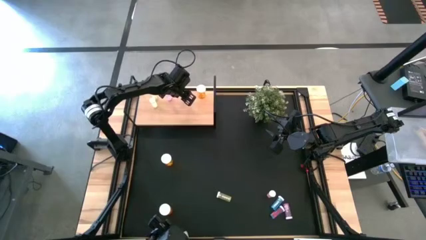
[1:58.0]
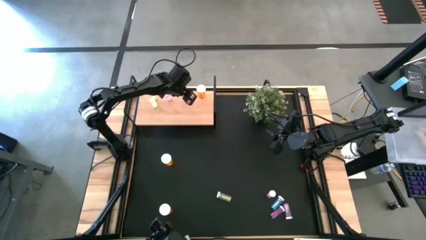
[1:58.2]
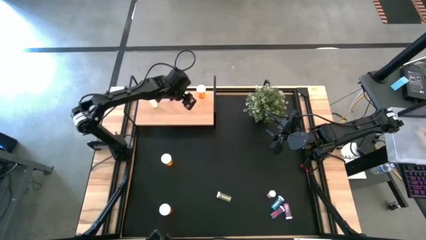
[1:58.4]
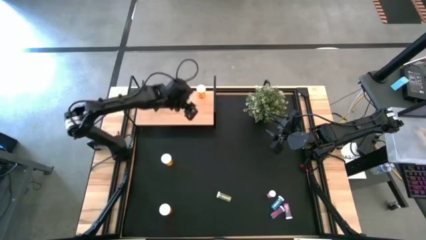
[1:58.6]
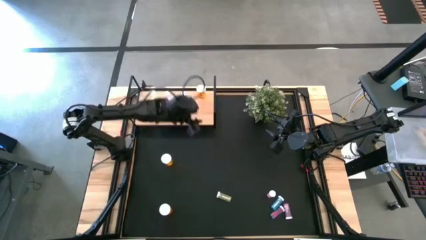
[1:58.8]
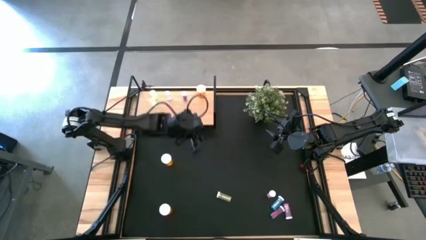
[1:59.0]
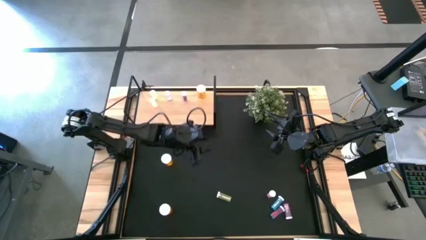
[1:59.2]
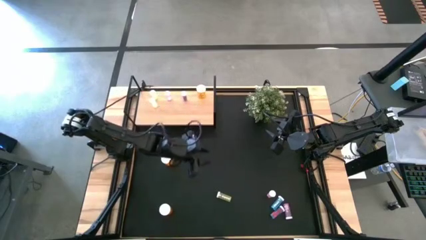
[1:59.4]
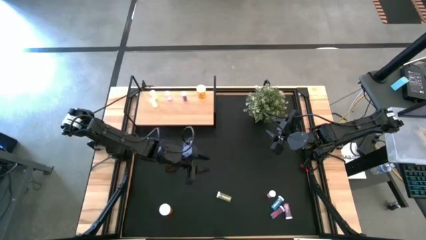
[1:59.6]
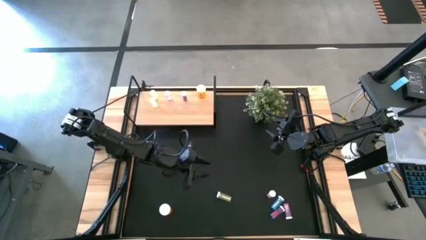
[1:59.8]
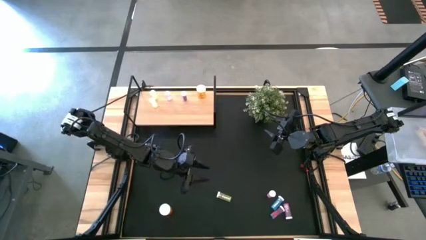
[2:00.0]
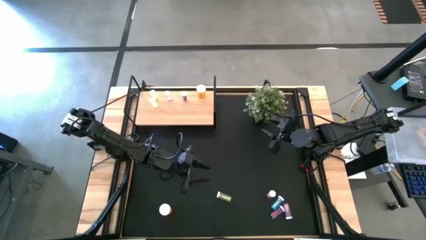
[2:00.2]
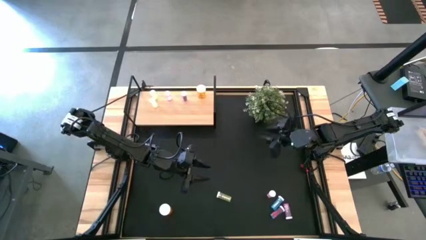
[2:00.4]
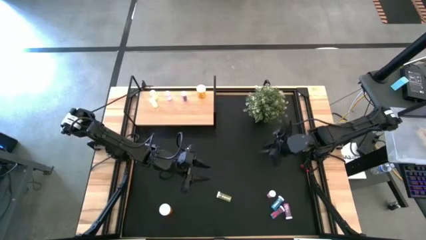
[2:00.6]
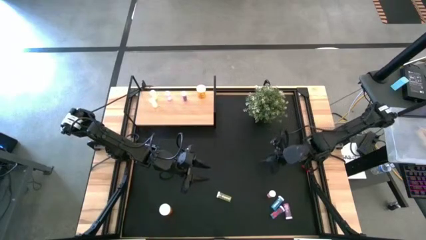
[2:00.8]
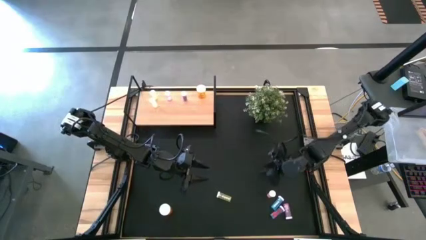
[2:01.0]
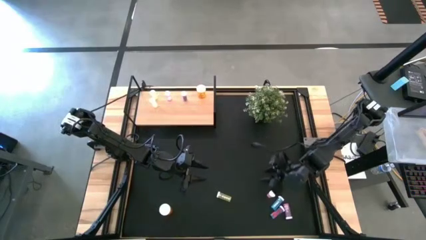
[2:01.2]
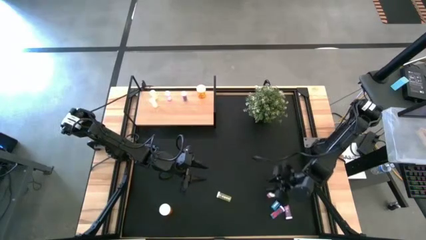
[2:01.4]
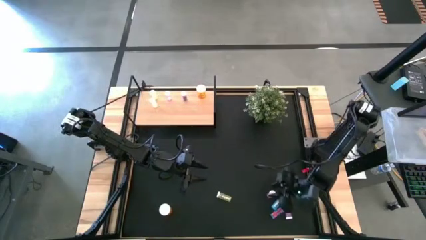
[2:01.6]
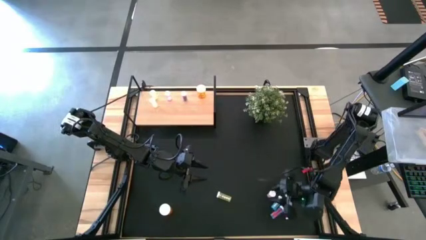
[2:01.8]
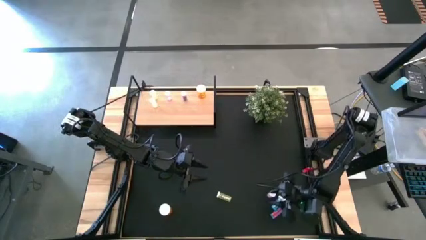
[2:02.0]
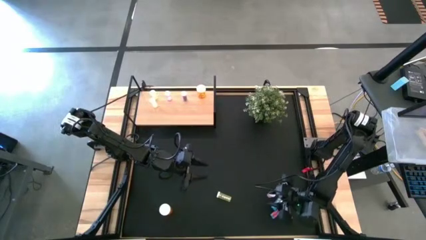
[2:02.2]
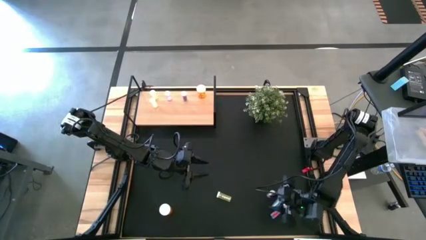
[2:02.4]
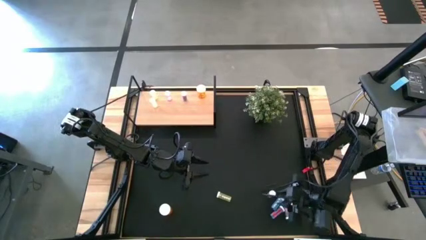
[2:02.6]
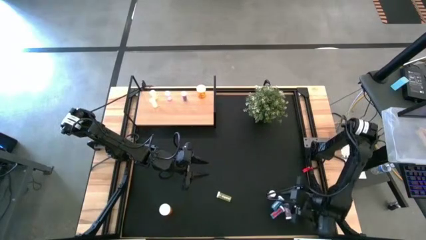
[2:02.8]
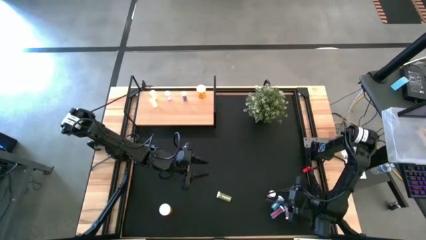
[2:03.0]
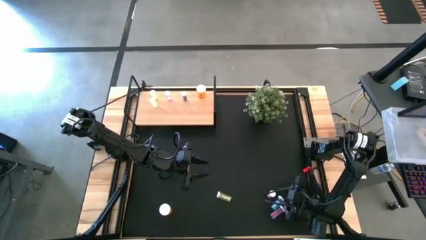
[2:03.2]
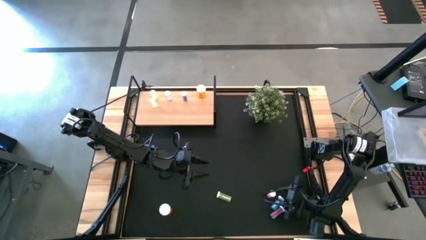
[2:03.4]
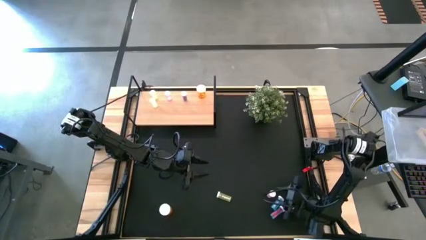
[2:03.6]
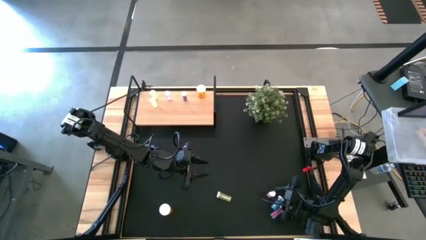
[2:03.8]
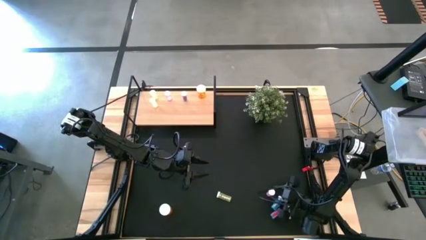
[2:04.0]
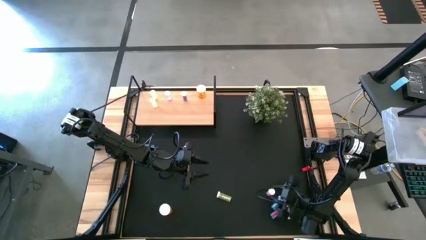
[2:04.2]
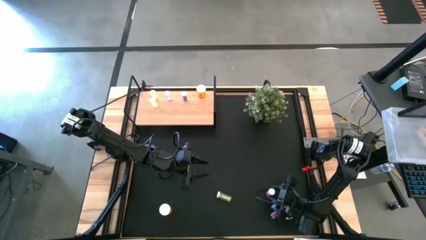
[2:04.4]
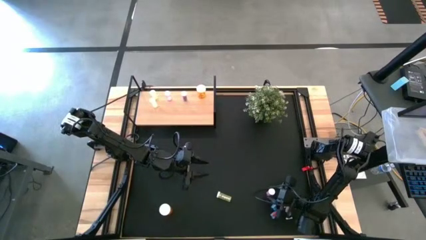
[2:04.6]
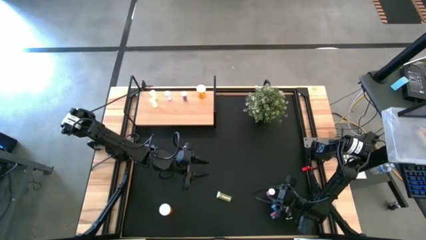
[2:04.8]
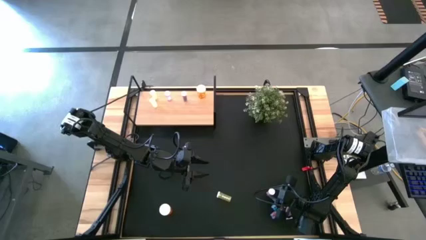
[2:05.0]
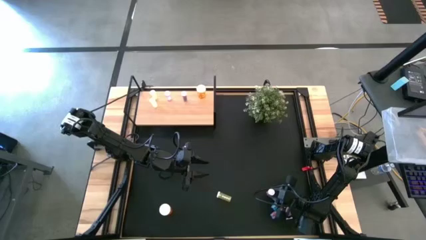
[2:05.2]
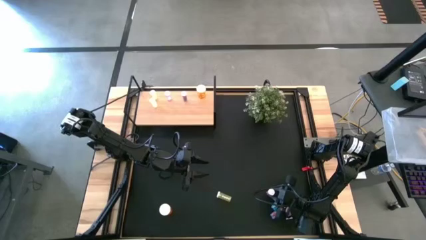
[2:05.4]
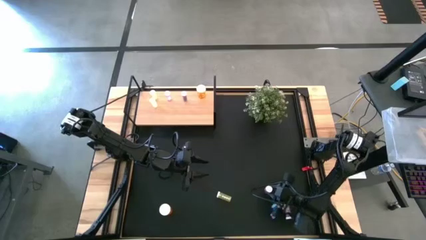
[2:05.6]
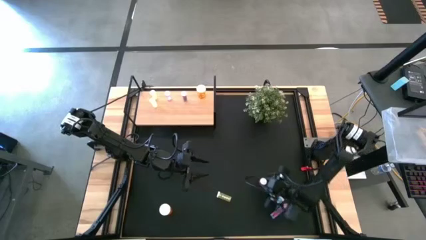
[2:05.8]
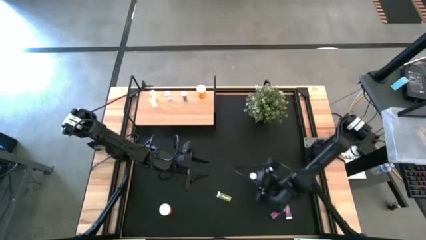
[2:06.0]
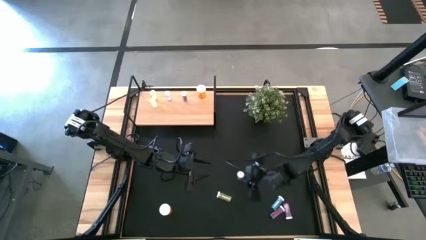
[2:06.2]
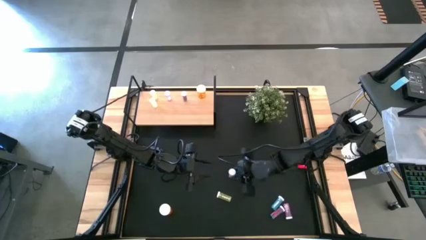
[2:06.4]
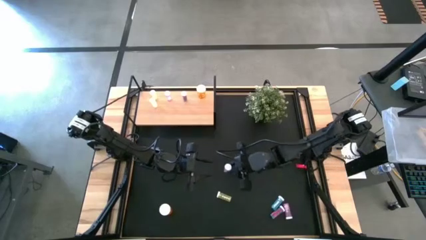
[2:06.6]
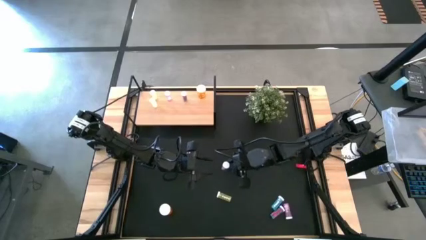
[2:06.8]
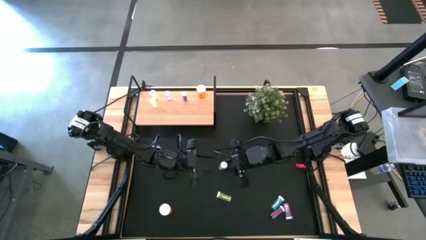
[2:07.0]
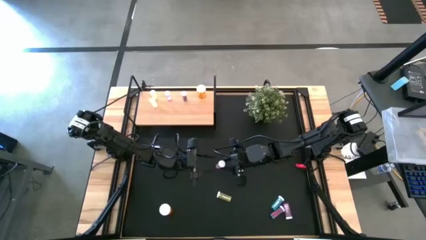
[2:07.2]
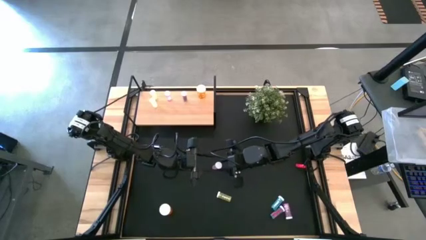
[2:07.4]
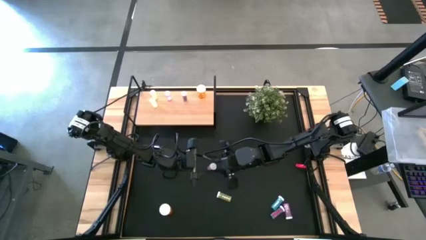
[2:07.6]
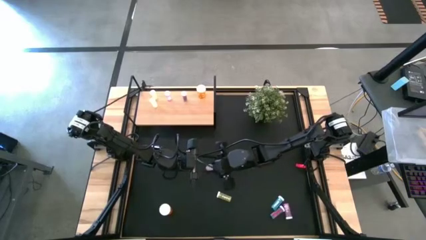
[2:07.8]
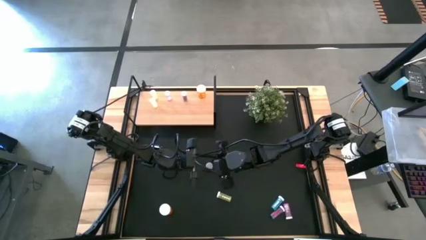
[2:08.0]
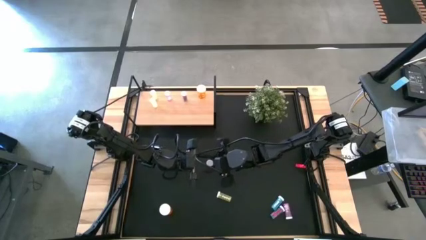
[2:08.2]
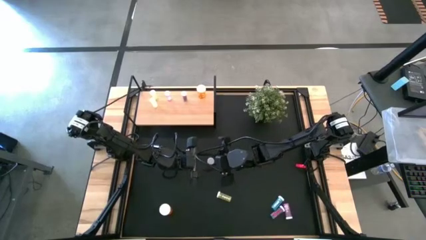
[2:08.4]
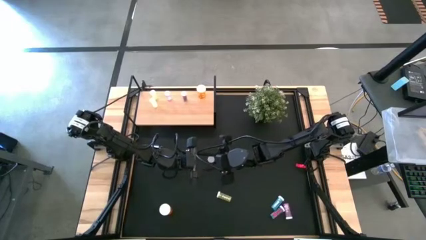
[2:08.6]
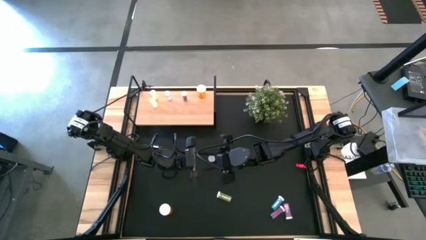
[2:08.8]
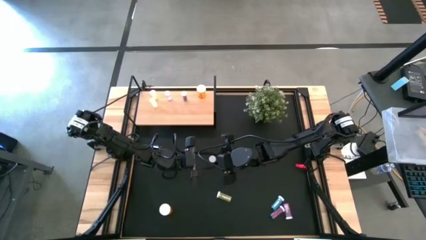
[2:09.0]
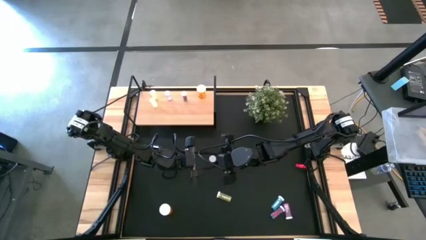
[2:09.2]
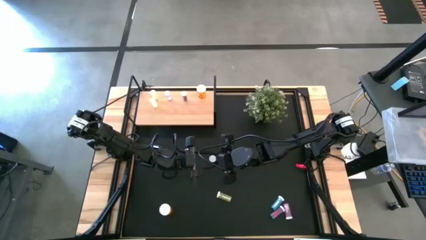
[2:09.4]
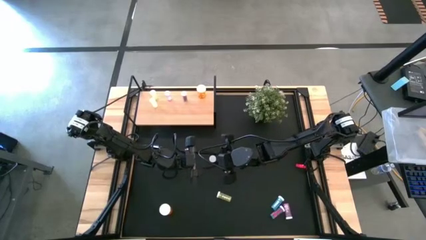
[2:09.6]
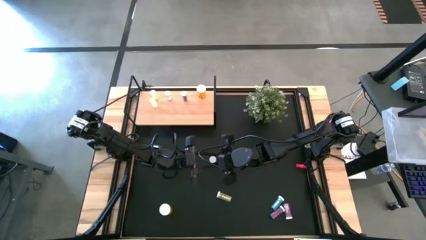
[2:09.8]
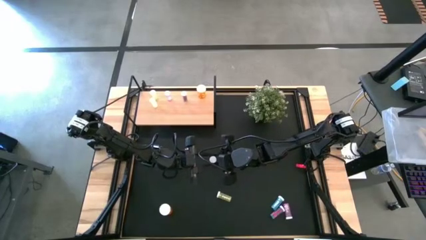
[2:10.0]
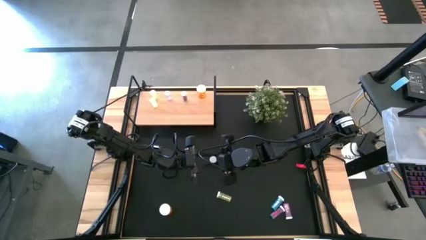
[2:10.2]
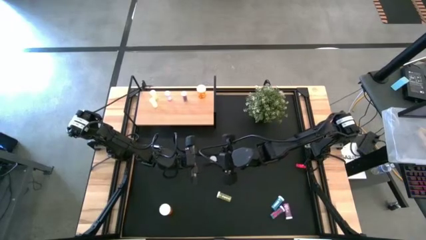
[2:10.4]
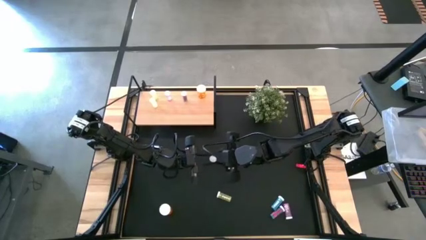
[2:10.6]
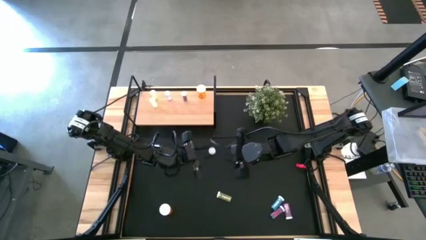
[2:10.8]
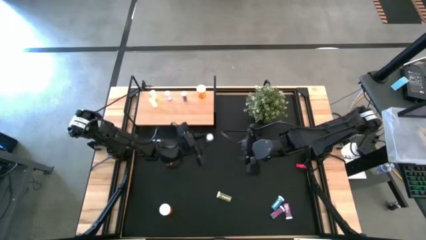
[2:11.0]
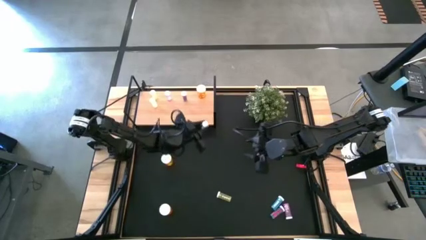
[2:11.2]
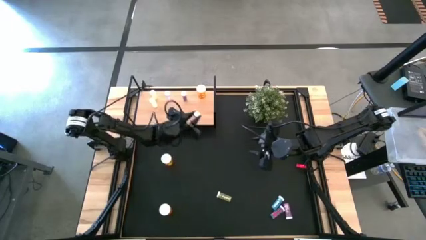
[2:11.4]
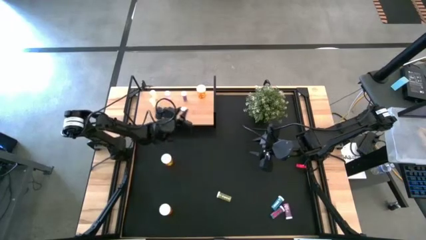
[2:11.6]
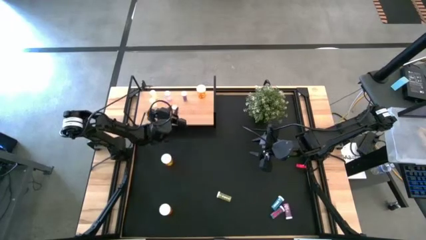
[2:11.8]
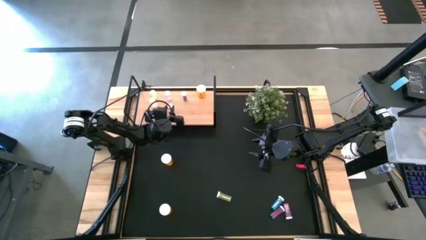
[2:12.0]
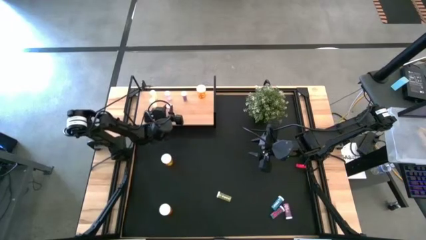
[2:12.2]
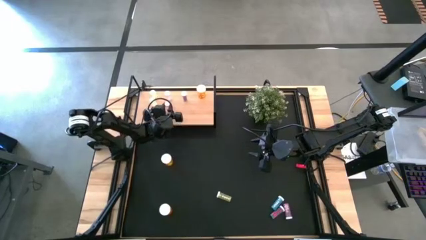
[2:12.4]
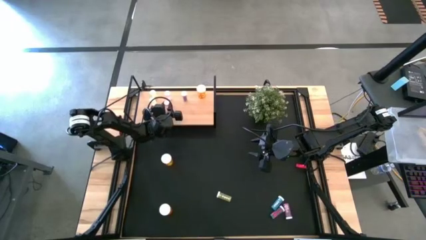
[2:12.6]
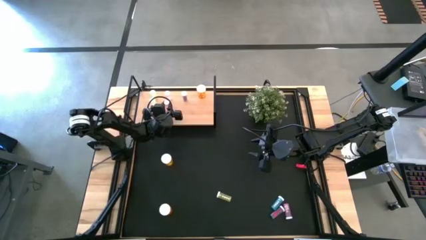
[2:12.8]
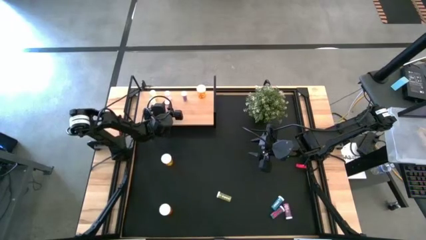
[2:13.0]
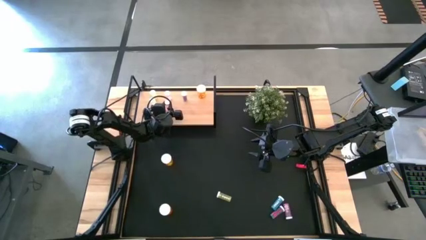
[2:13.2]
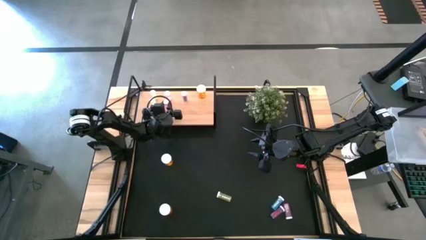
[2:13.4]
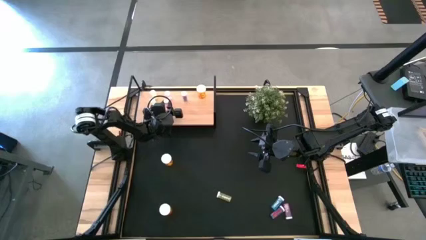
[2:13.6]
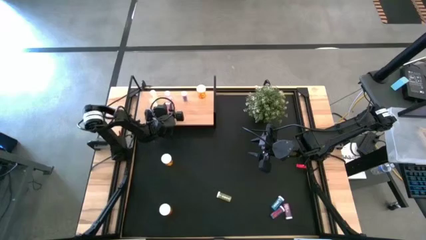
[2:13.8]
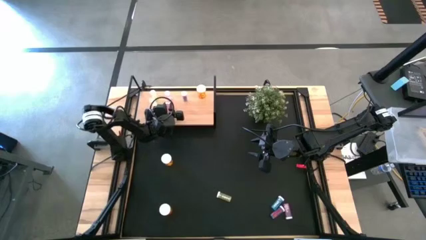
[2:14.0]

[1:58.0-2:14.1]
Task: Pick and place medicine bottles onto shelf by color
Put the top pink medicine bottle on the shelf aligned with the other pink medicine bottle

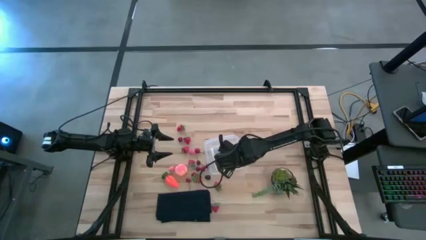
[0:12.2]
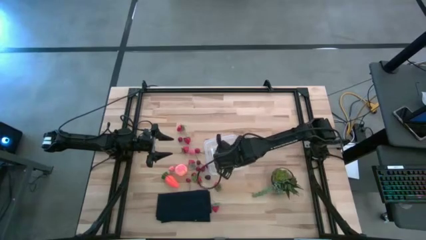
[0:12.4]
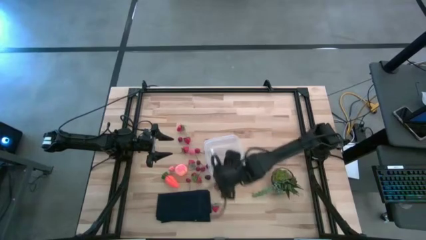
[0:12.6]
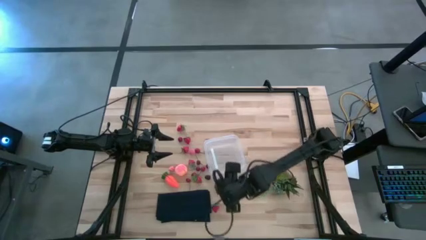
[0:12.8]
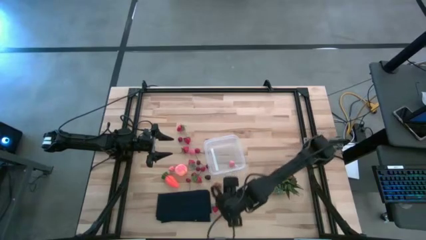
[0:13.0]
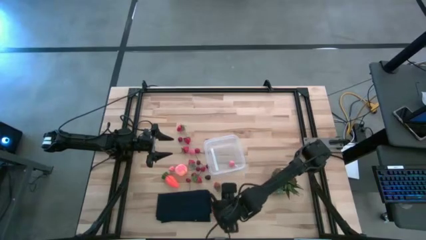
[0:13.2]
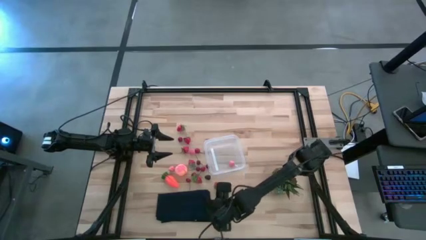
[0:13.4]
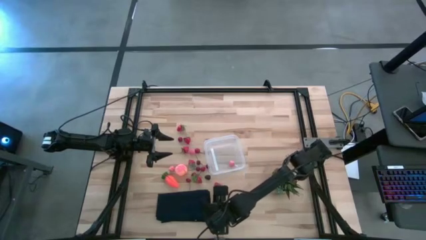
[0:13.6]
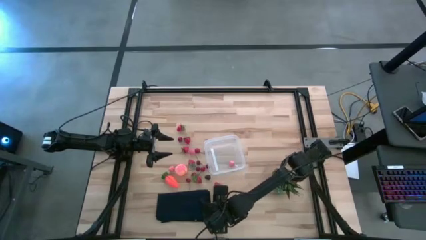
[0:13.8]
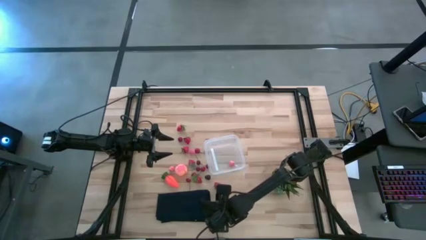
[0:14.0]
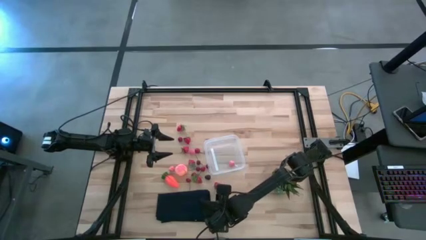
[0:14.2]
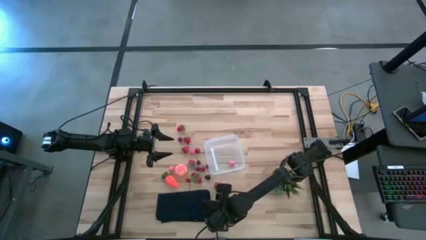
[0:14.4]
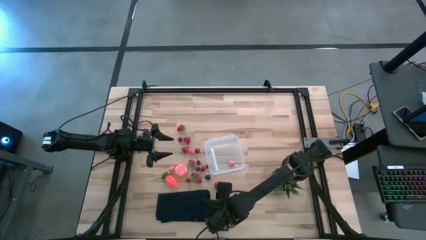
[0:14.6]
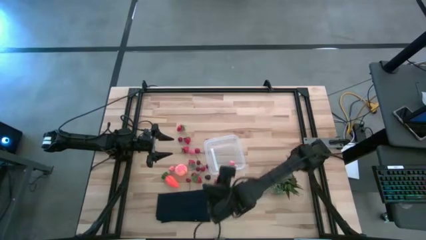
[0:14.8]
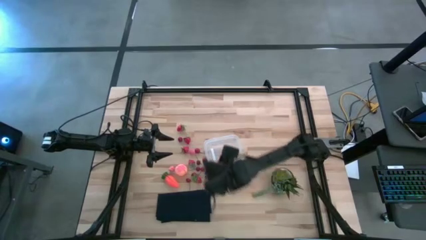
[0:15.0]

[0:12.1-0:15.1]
Task: Pick and placing Produce into tupperware
Put the red strawberry into the container
